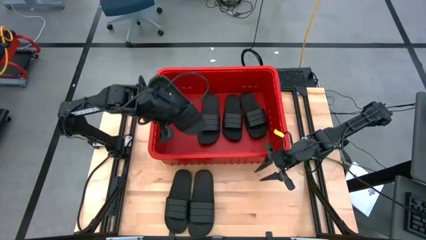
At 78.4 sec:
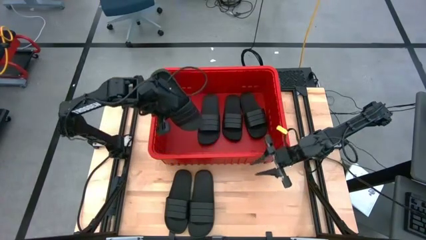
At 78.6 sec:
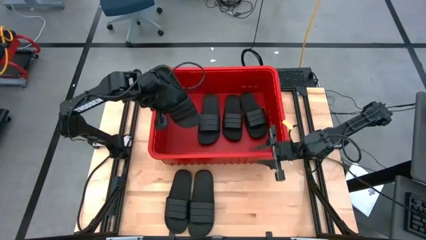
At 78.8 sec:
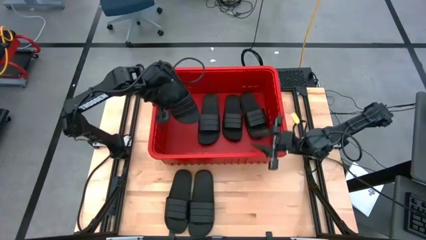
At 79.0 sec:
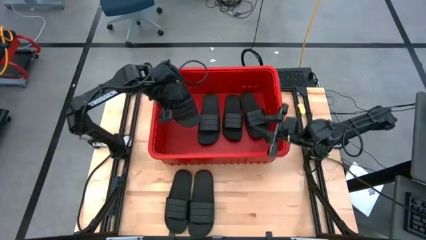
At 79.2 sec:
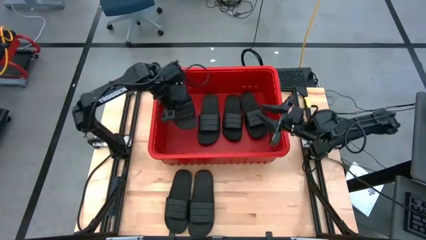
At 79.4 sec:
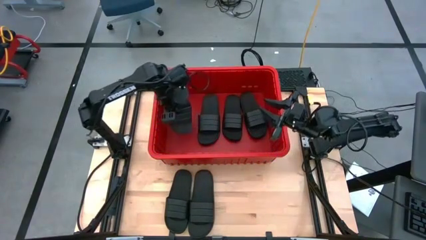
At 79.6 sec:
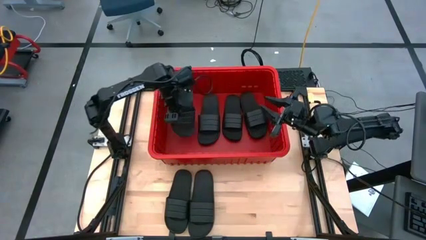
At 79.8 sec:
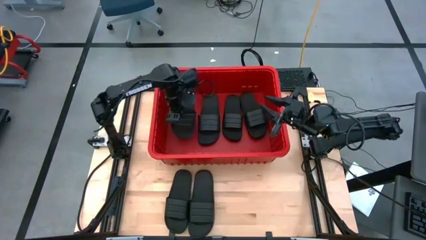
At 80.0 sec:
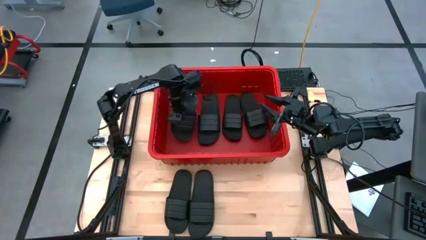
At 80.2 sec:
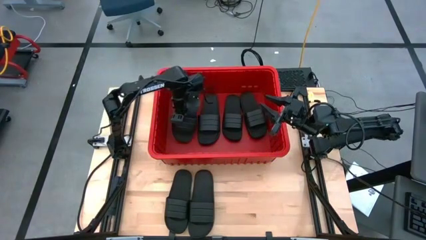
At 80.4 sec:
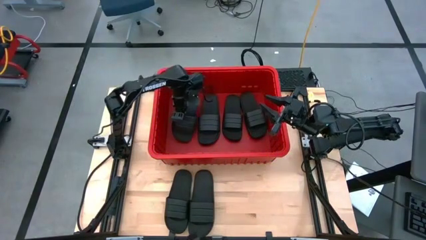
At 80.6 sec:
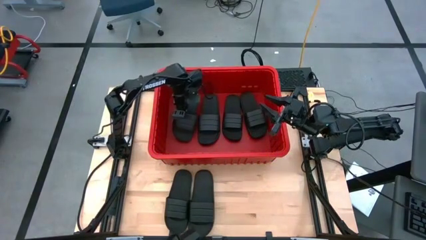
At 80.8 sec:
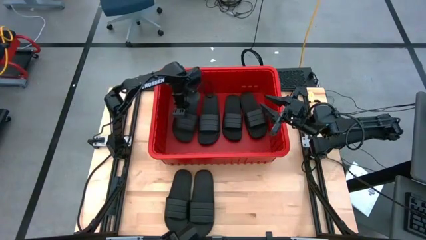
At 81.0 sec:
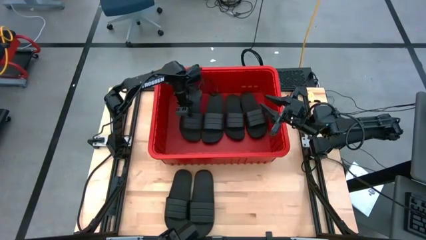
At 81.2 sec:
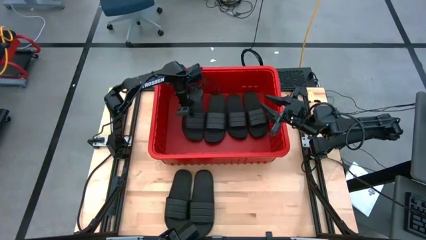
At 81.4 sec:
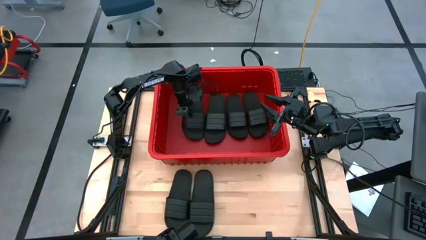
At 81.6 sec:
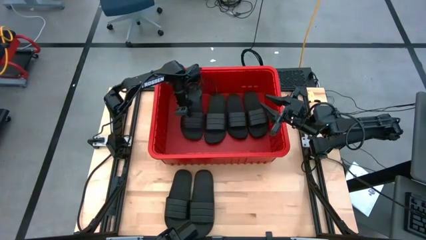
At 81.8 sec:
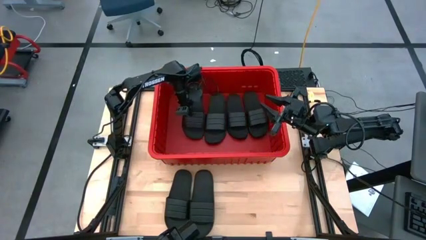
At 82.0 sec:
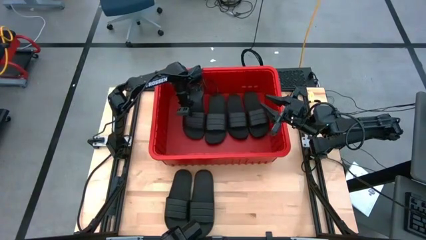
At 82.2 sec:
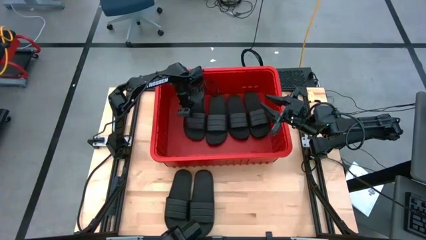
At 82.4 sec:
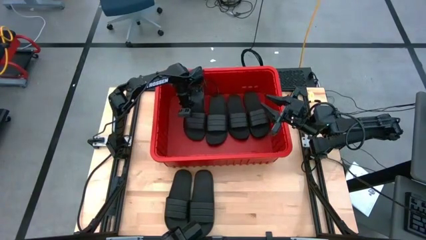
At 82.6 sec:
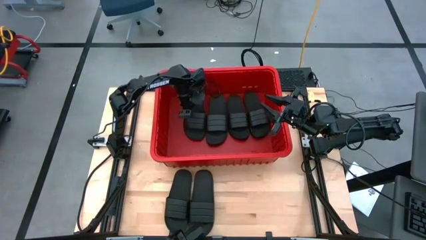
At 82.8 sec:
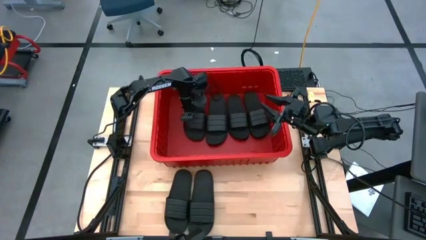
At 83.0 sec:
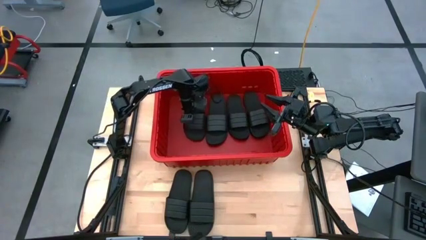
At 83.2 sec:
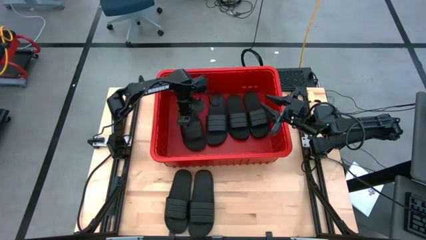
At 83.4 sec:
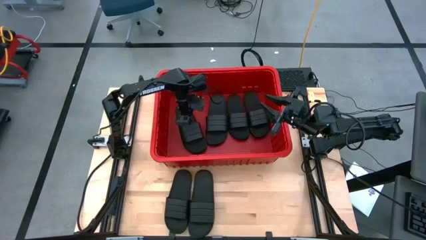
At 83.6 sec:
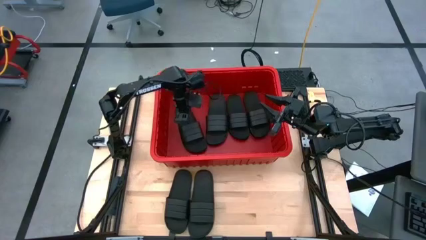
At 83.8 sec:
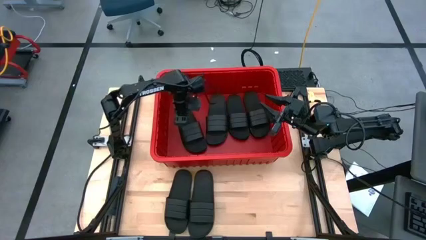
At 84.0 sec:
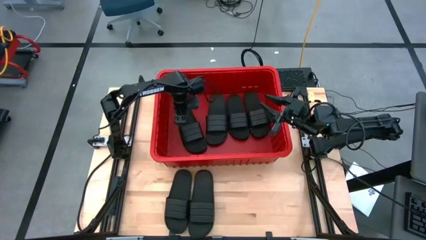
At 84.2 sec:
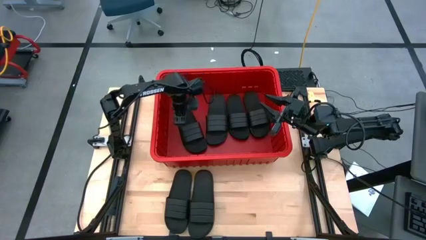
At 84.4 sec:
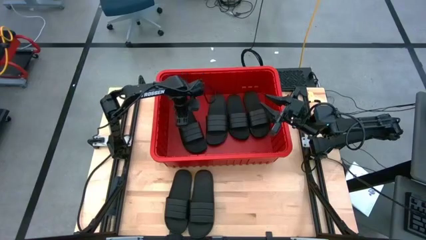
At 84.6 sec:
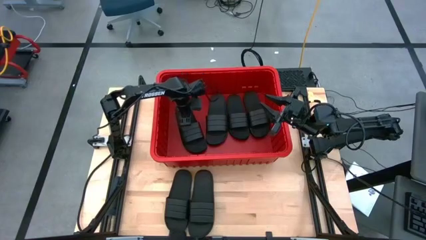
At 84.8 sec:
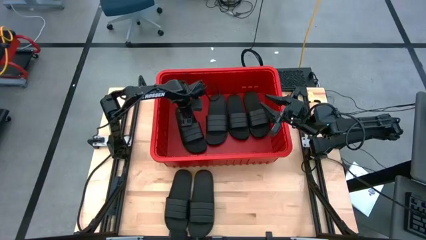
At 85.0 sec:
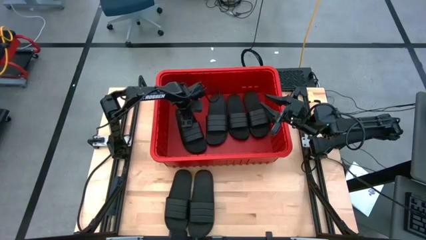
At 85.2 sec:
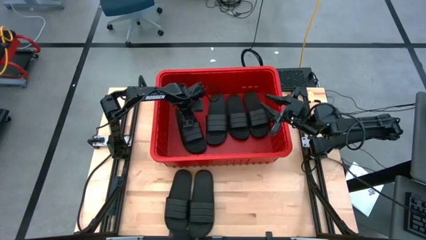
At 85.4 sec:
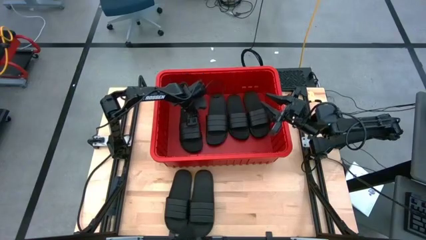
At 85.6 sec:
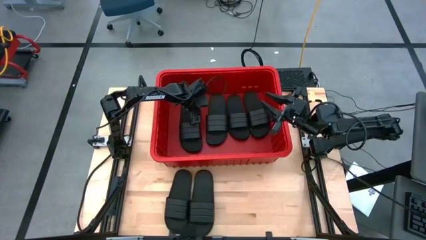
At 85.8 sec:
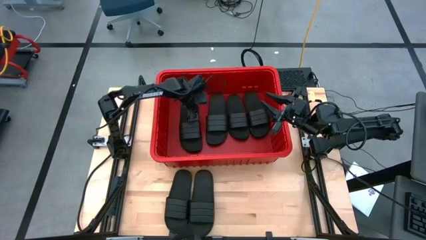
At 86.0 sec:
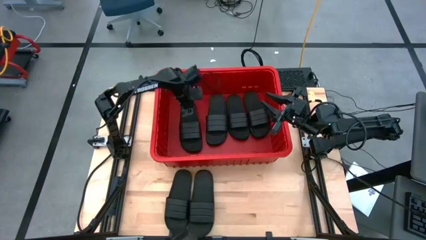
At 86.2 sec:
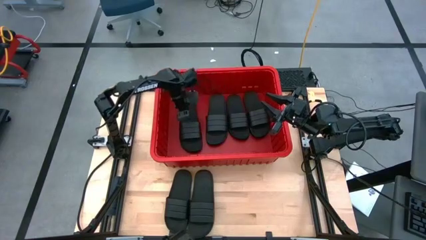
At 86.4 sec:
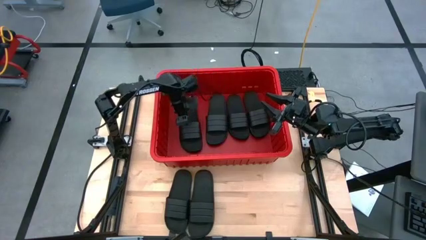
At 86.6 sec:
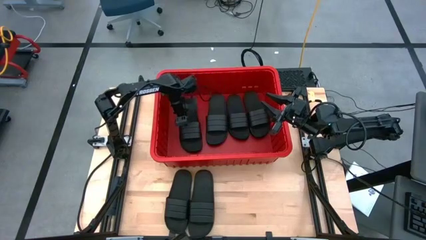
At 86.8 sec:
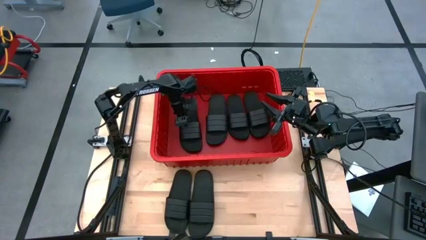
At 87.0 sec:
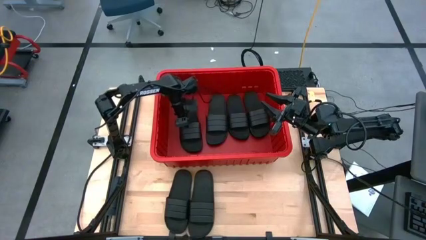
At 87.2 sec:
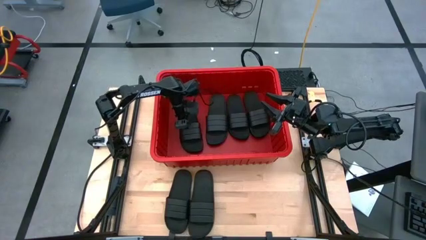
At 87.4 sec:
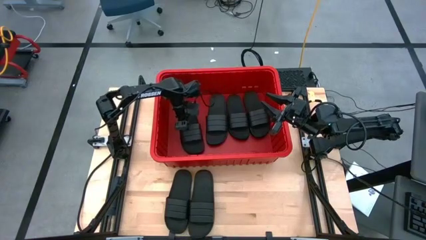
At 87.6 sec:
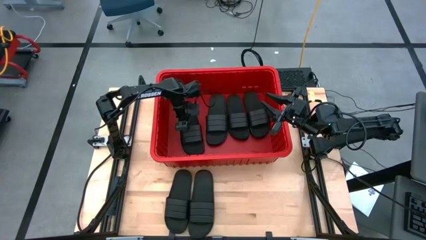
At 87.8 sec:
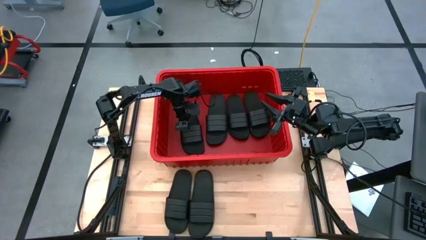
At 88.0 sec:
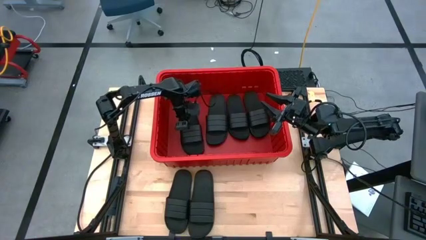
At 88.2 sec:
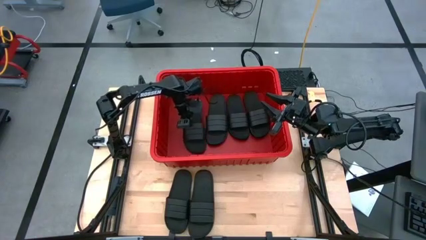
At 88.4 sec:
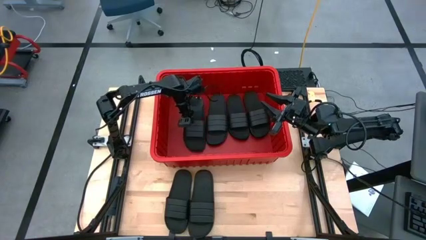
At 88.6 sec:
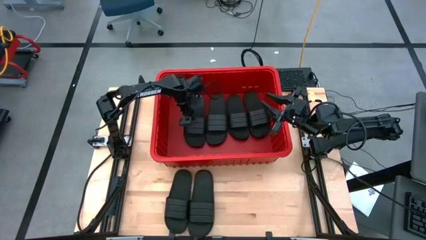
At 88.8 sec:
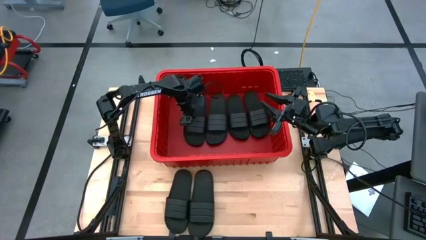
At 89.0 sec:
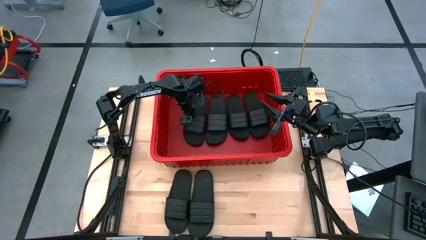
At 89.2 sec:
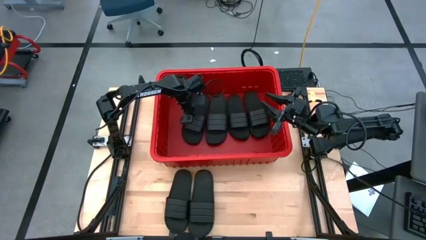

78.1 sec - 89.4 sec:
Task: Pick and place slides into bin
Put the black slide into the red bin
